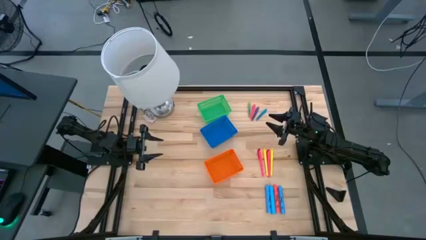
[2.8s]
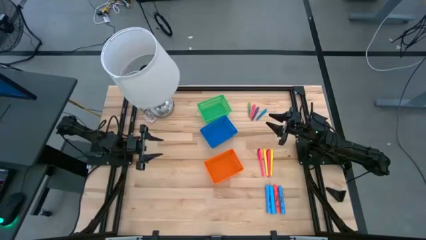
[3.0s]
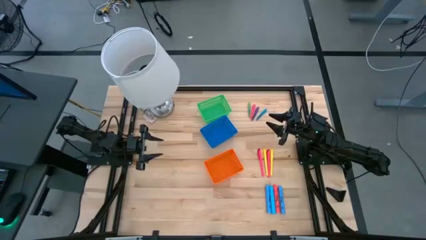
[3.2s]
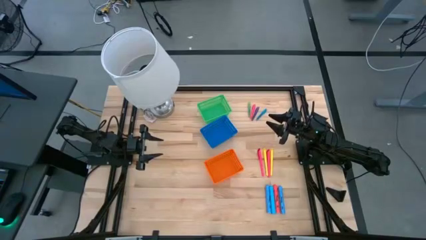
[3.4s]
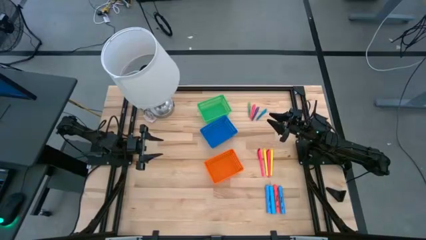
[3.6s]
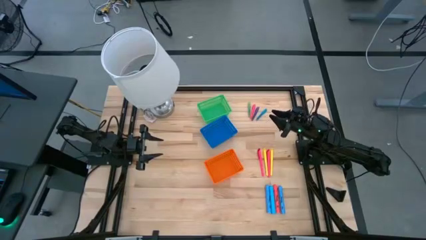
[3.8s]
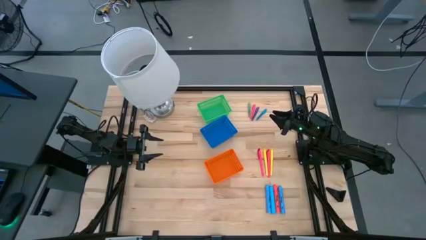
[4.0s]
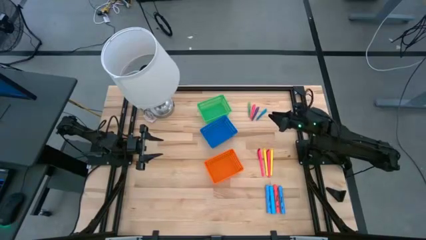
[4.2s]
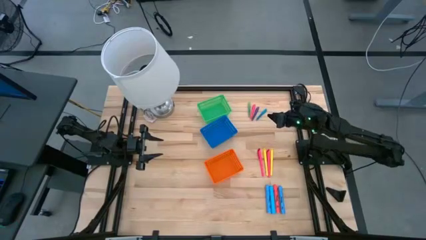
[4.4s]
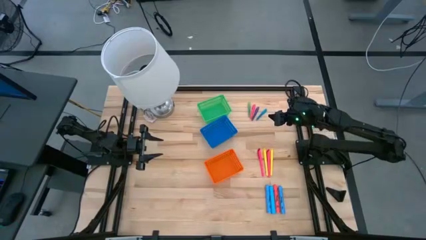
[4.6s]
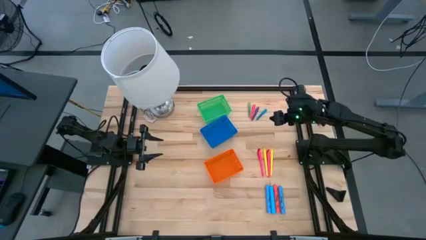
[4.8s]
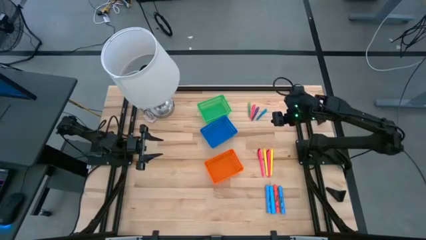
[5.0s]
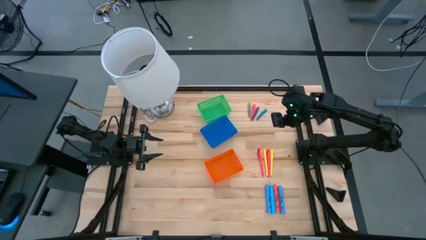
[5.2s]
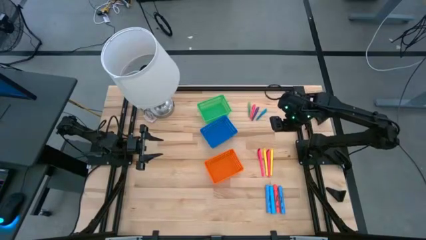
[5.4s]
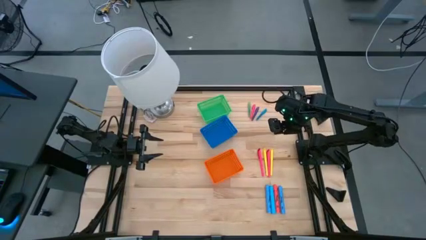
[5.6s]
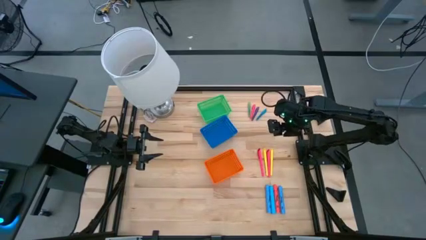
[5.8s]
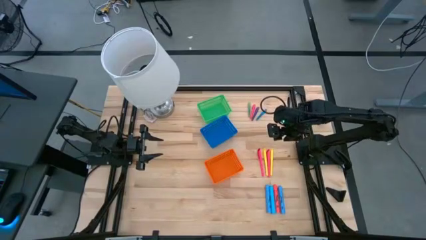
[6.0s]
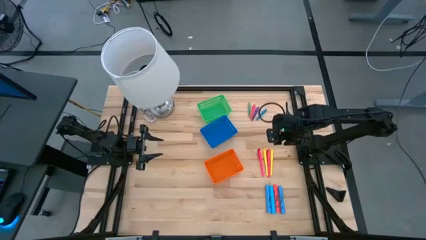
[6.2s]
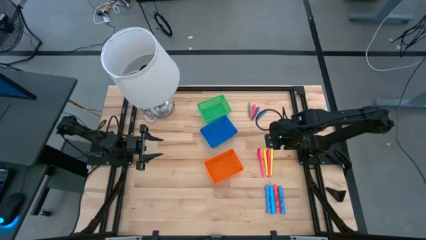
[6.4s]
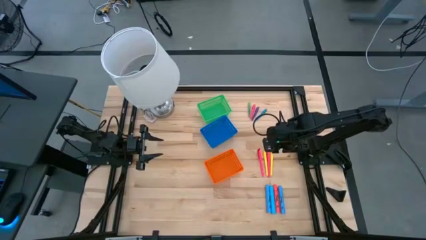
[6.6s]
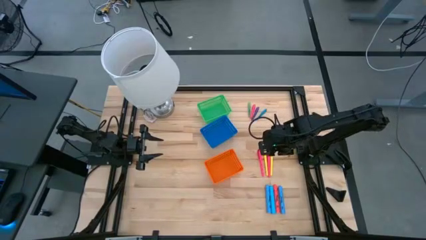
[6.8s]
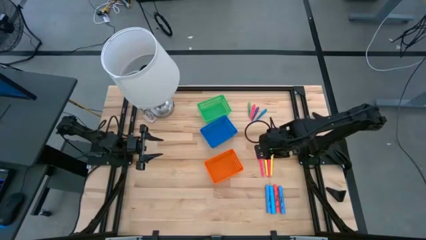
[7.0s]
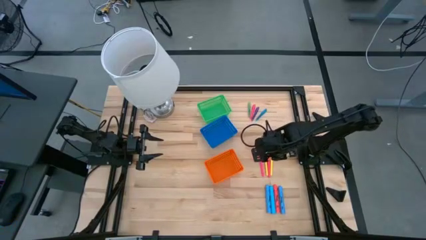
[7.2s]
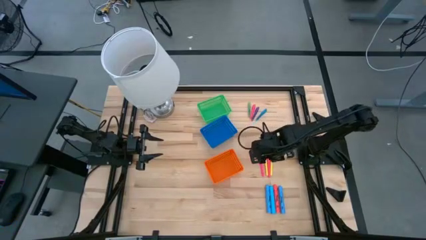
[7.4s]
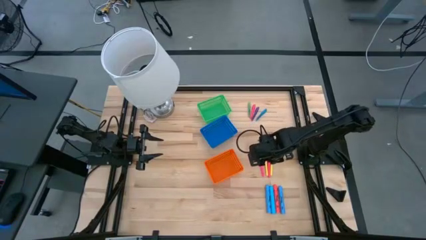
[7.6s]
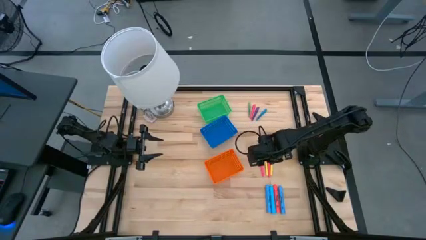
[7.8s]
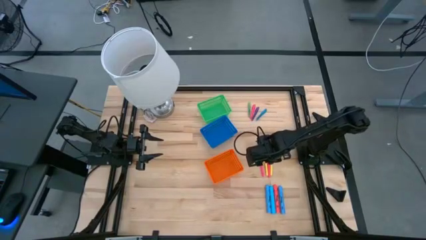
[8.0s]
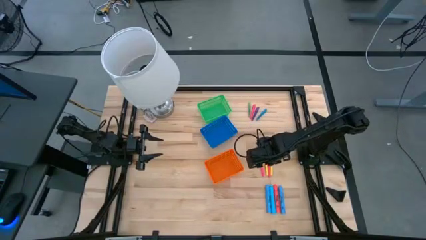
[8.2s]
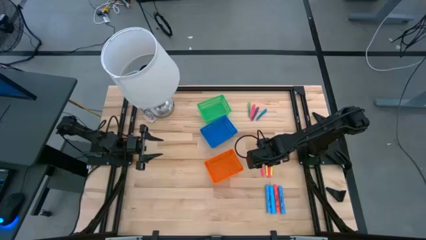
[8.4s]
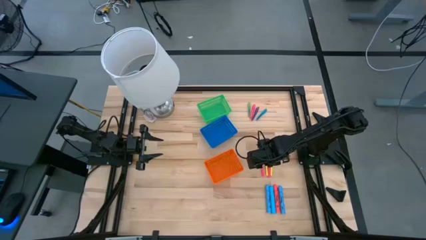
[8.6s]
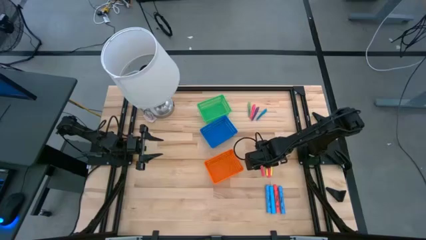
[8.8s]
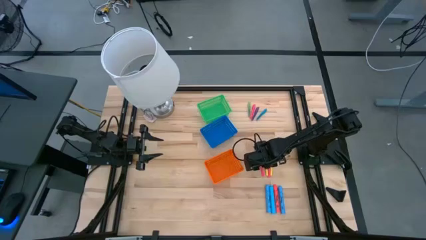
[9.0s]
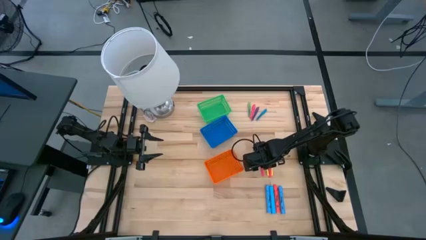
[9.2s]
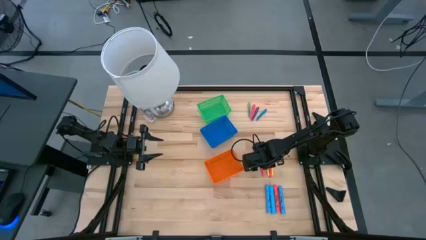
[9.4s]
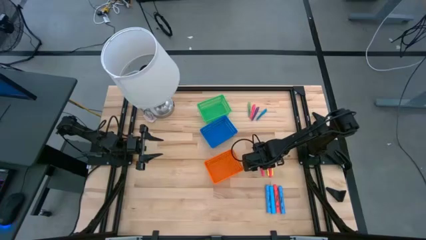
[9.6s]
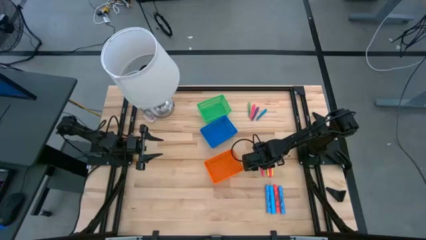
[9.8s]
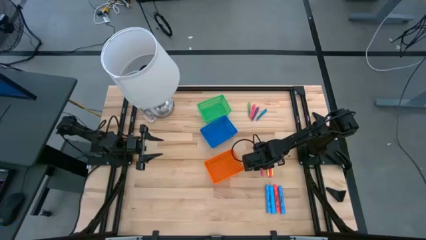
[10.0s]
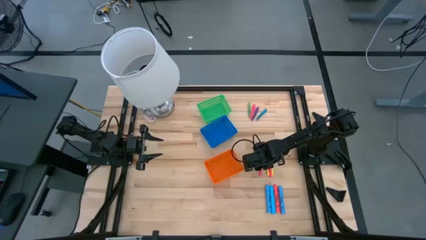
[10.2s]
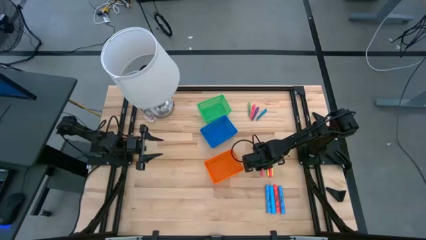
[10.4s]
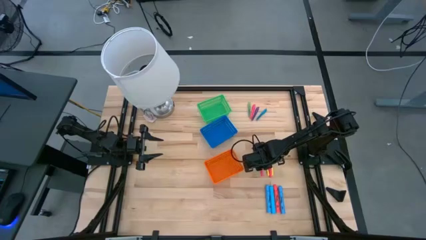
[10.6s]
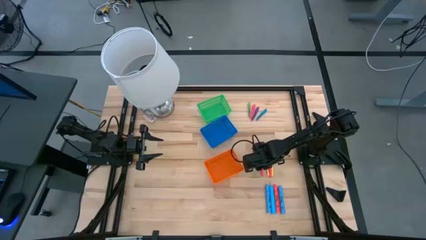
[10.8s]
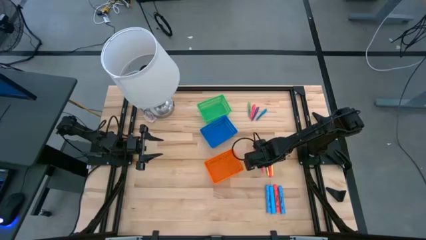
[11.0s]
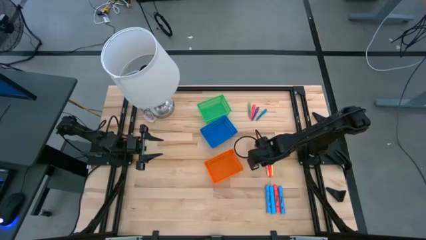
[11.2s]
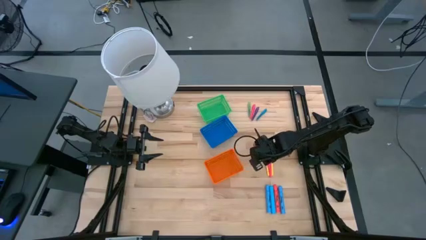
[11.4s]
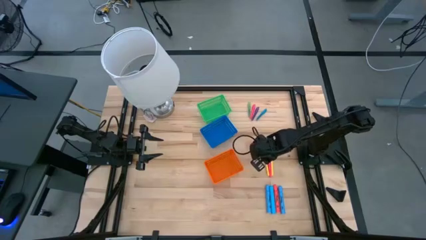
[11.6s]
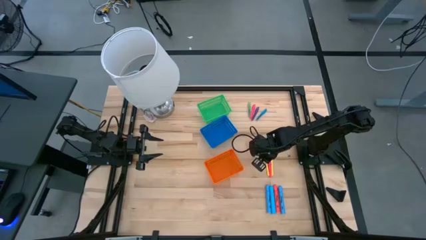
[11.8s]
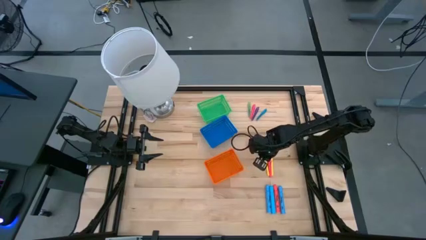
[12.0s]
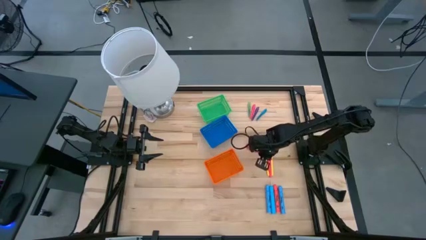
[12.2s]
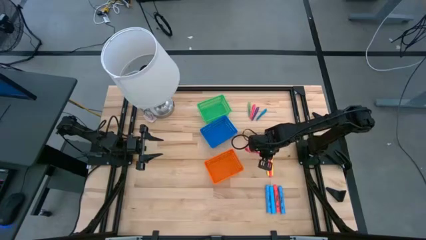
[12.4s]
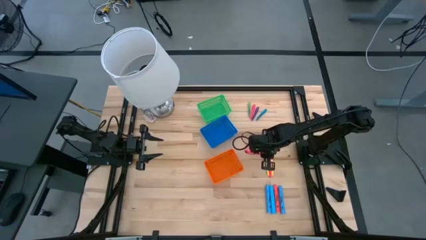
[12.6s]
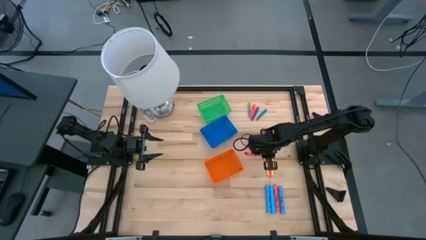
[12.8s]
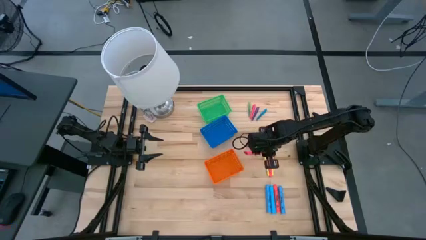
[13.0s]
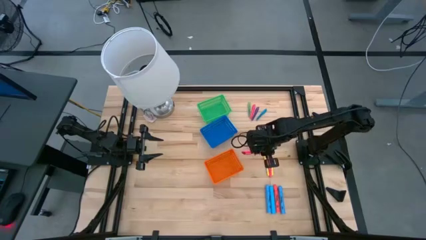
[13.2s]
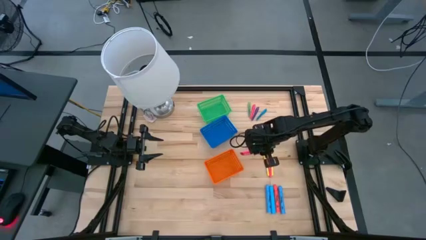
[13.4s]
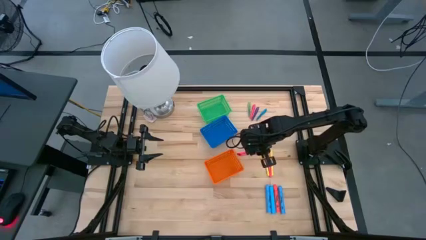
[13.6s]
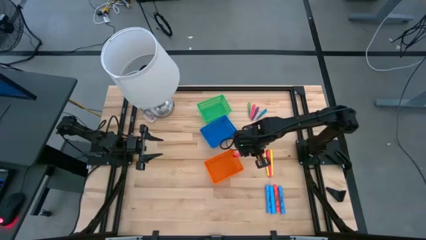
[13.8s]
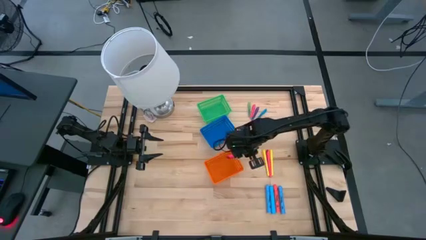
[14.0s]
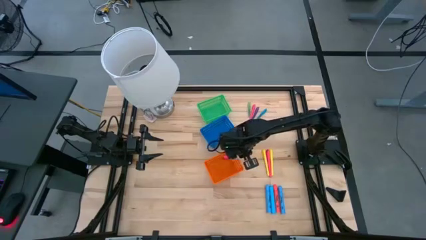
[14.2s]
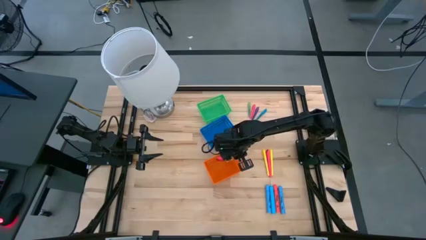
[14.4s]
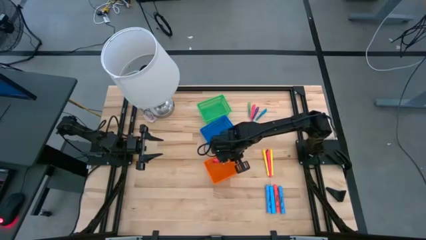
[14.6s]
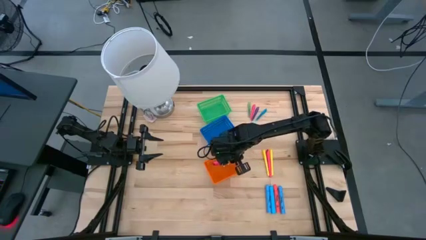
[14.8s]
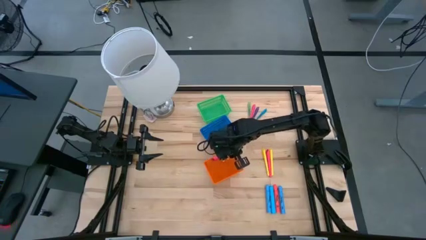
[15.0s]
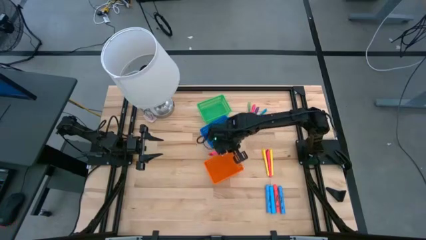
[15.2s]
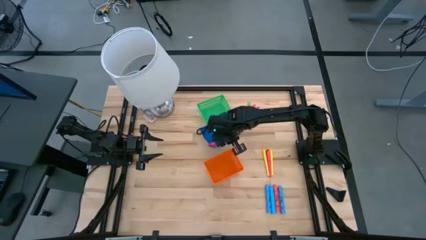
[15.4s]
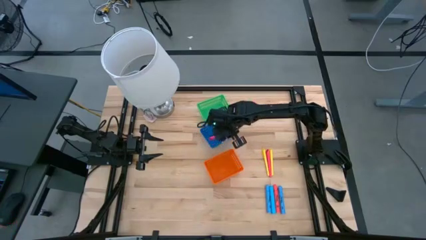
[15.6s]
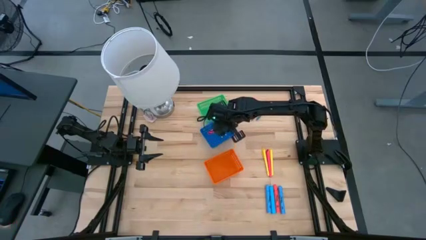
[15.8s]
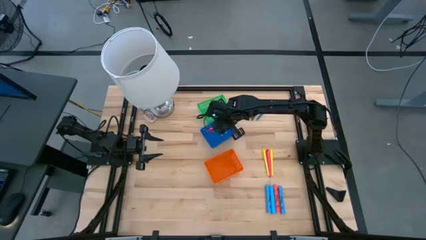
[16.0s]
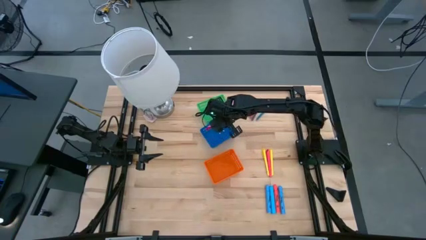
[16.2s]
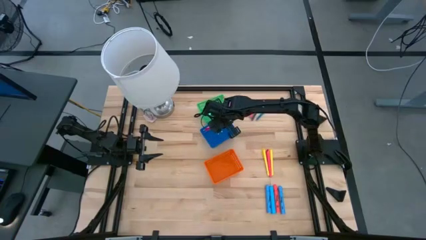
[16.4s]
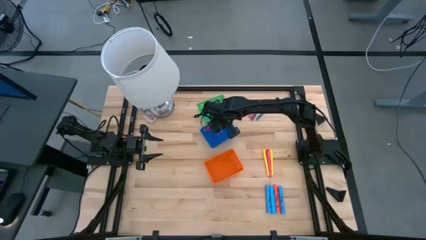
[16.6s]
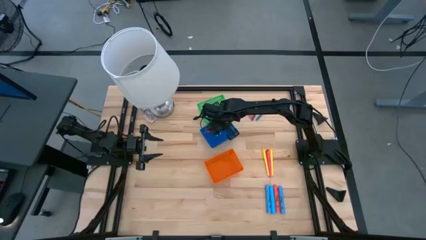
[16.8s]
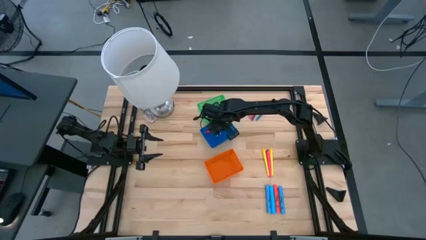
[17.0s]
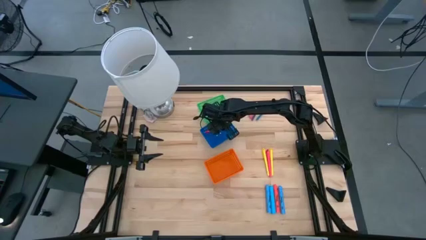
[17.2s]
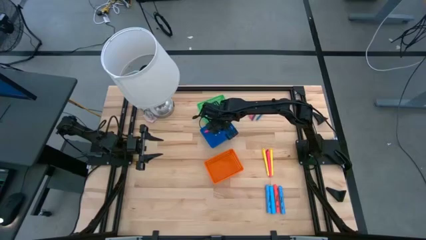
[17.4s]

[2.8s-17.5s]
Task: Pick & Place Markers
Put the left pink pen into the blue bin
